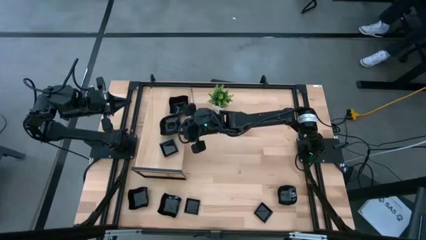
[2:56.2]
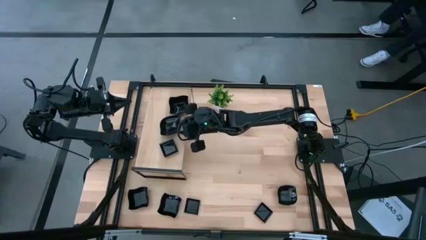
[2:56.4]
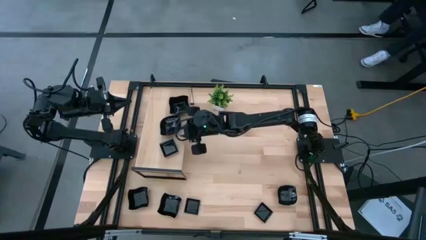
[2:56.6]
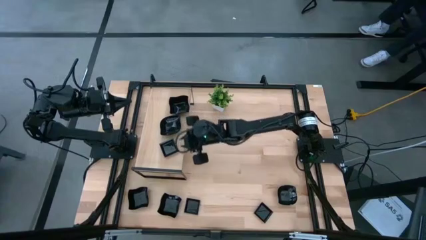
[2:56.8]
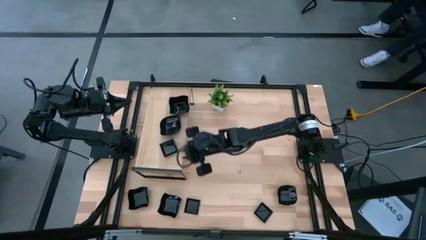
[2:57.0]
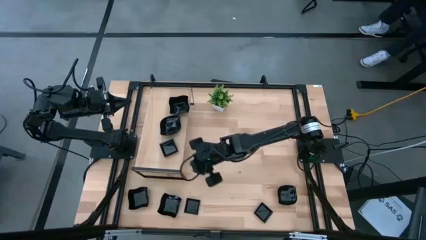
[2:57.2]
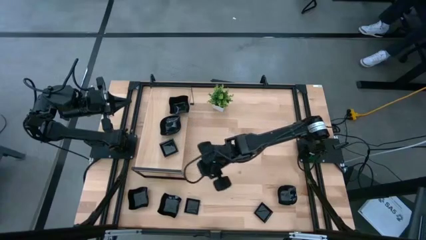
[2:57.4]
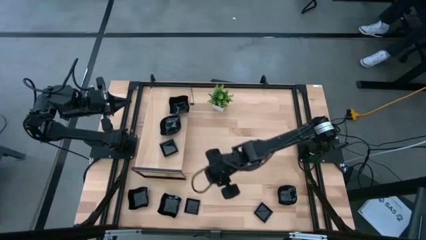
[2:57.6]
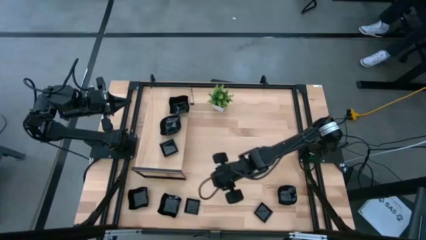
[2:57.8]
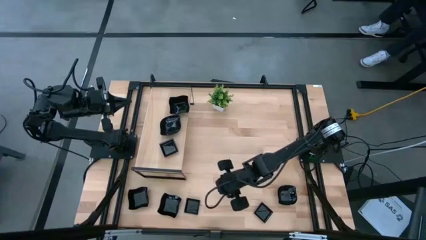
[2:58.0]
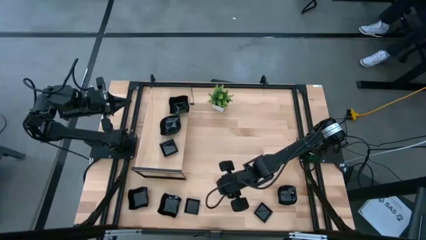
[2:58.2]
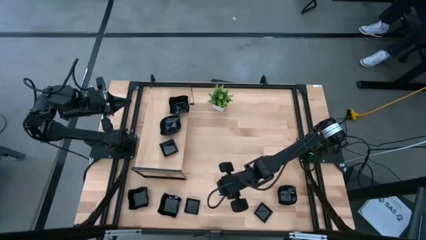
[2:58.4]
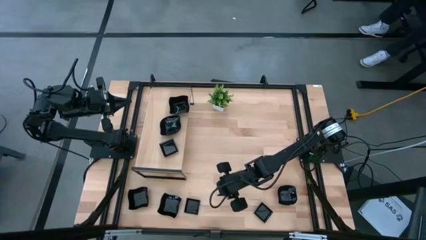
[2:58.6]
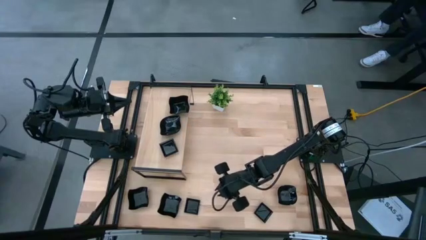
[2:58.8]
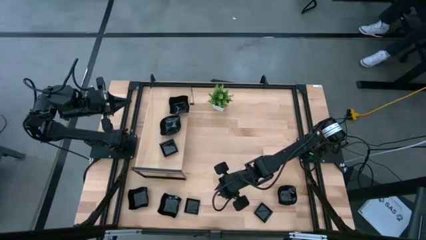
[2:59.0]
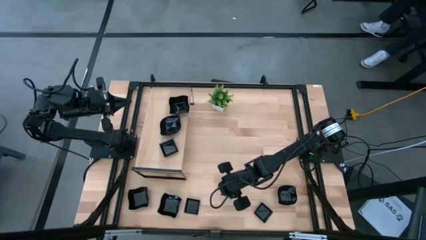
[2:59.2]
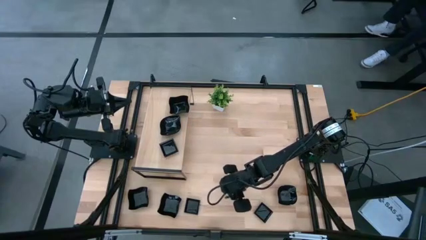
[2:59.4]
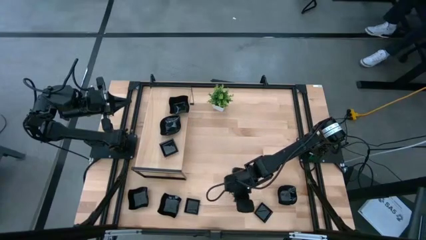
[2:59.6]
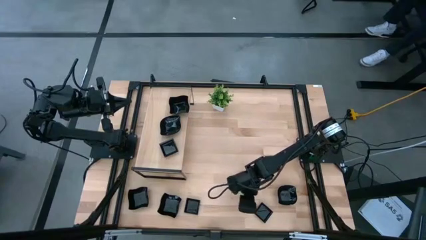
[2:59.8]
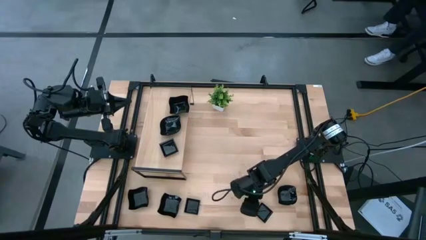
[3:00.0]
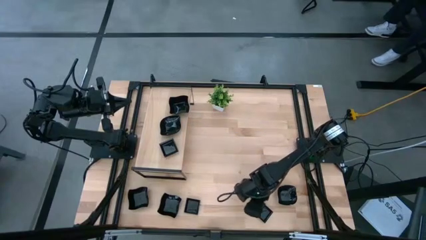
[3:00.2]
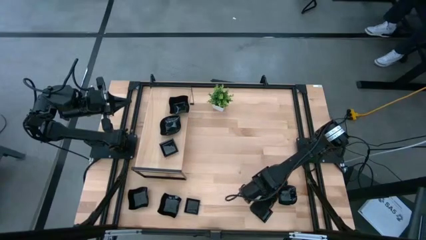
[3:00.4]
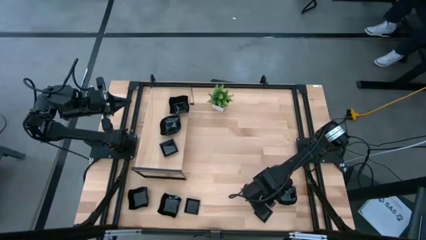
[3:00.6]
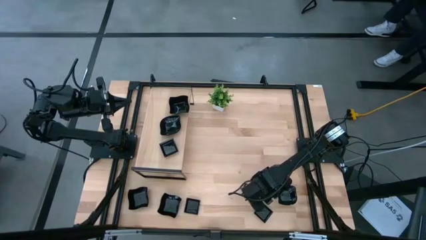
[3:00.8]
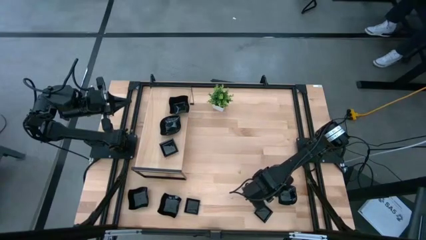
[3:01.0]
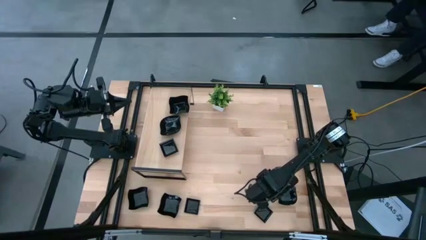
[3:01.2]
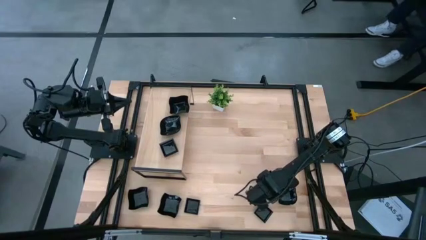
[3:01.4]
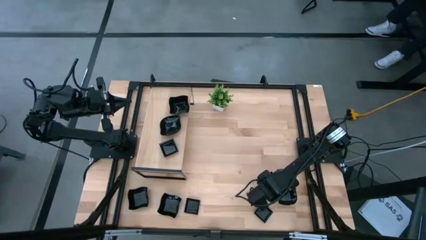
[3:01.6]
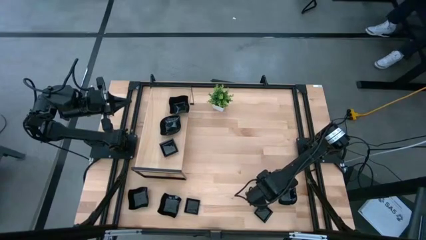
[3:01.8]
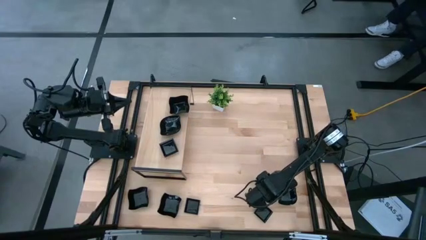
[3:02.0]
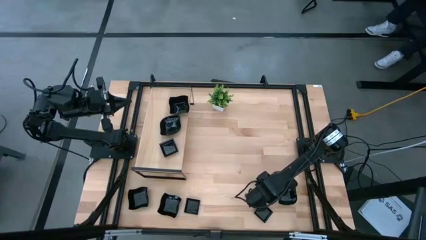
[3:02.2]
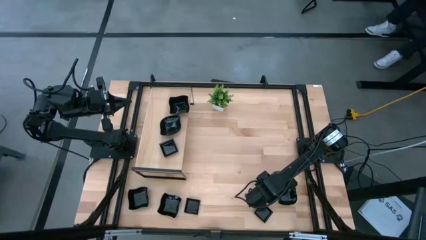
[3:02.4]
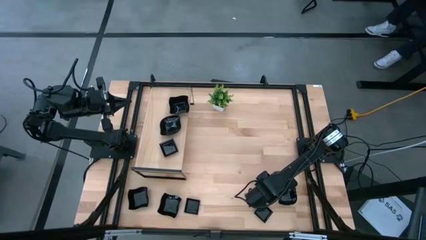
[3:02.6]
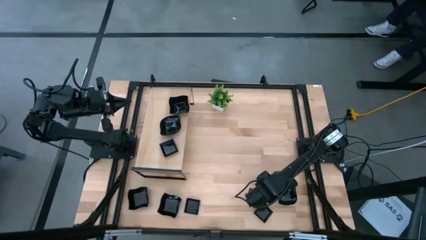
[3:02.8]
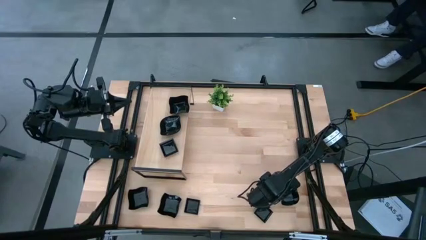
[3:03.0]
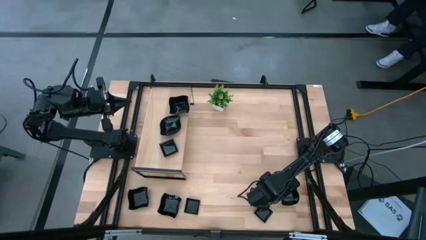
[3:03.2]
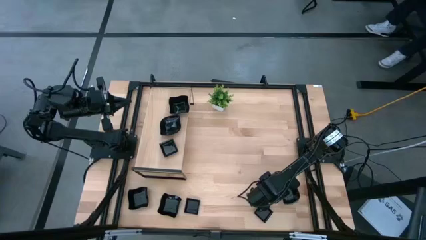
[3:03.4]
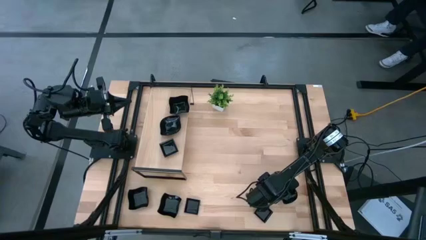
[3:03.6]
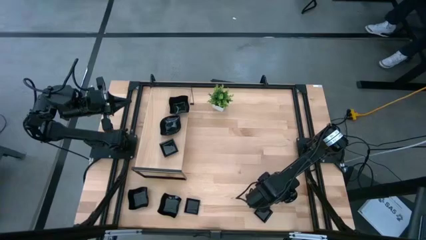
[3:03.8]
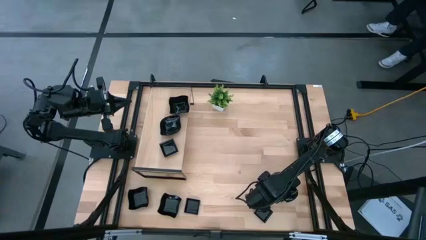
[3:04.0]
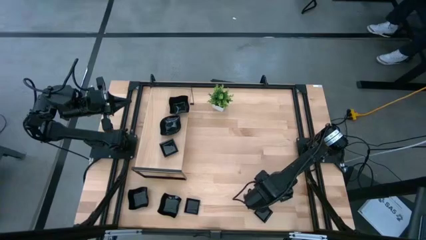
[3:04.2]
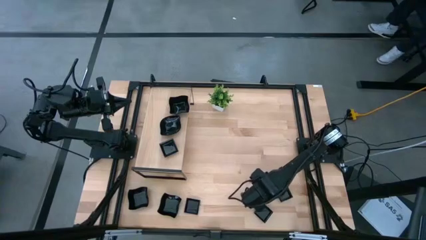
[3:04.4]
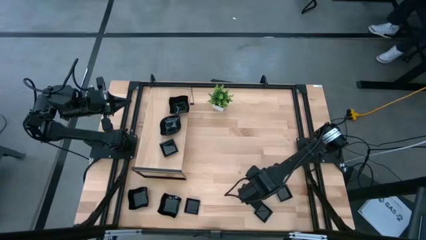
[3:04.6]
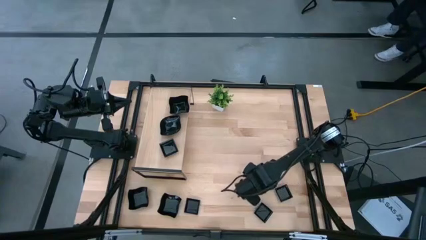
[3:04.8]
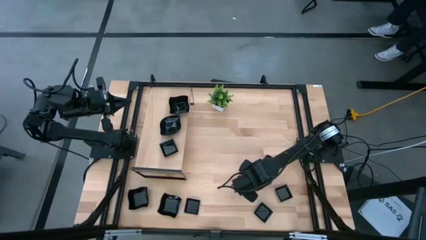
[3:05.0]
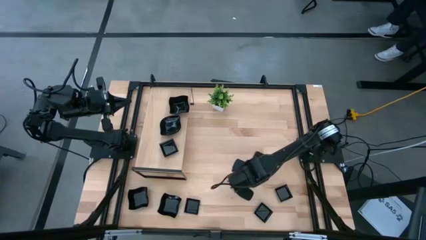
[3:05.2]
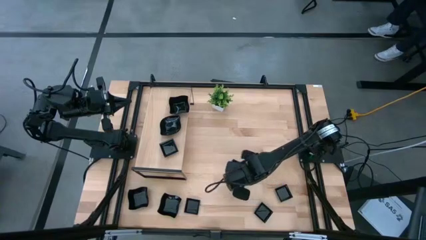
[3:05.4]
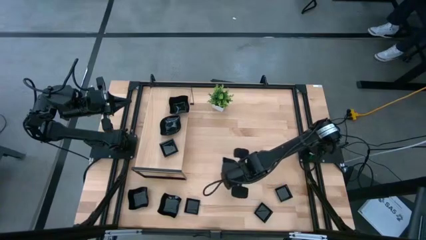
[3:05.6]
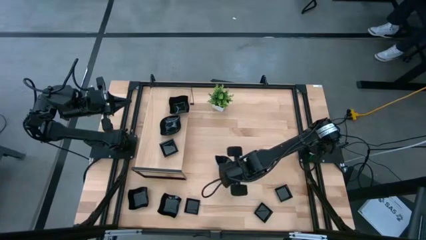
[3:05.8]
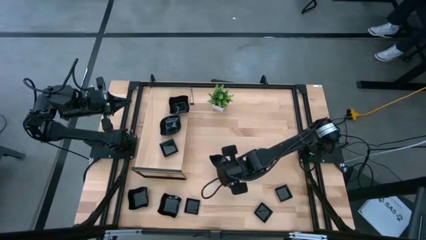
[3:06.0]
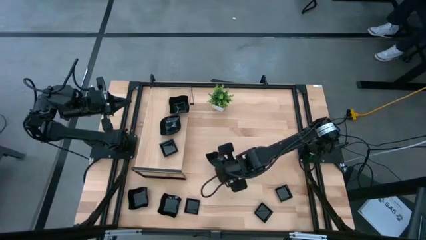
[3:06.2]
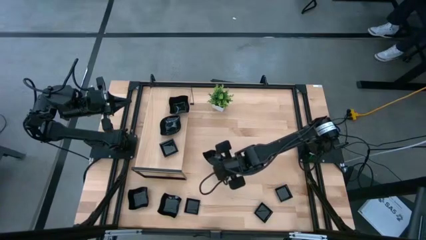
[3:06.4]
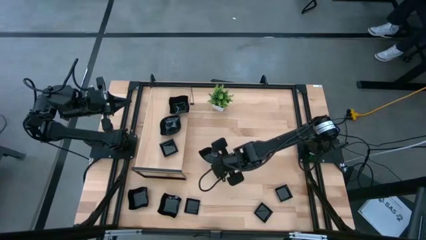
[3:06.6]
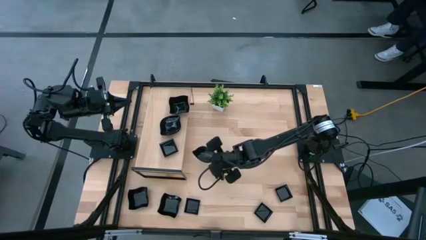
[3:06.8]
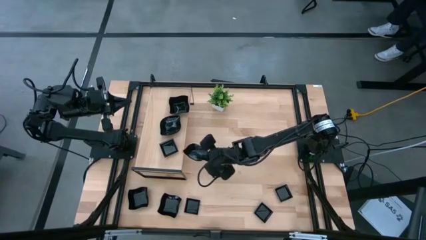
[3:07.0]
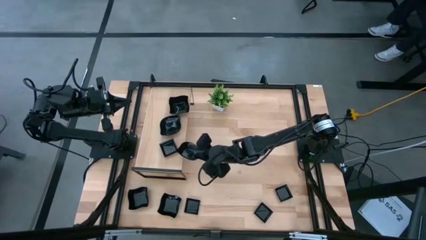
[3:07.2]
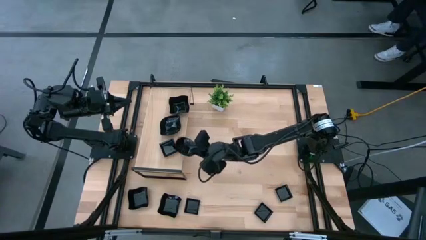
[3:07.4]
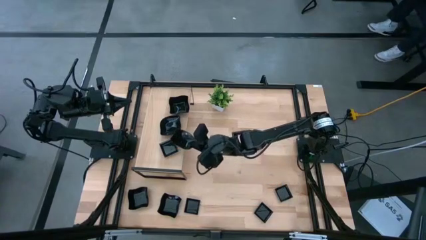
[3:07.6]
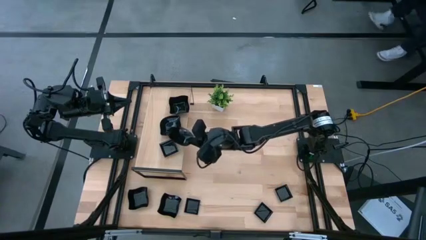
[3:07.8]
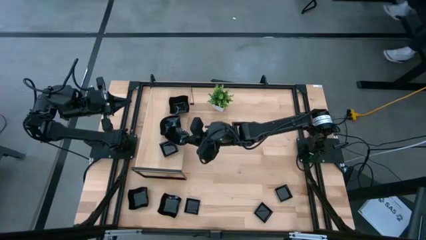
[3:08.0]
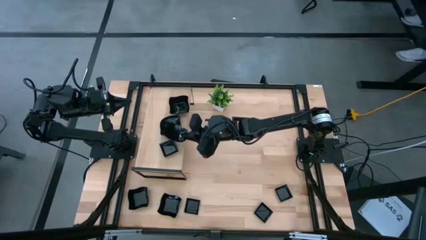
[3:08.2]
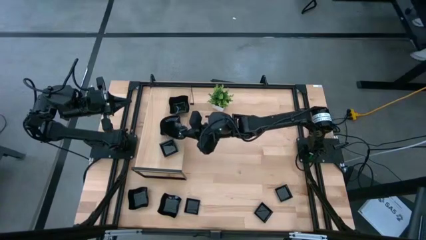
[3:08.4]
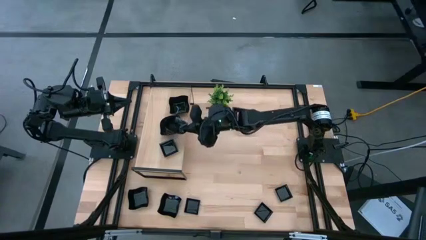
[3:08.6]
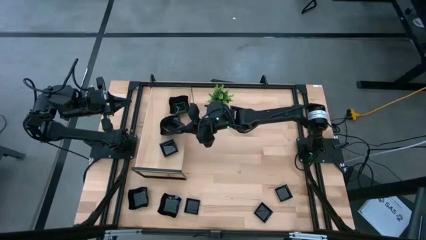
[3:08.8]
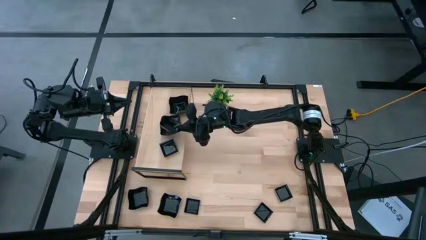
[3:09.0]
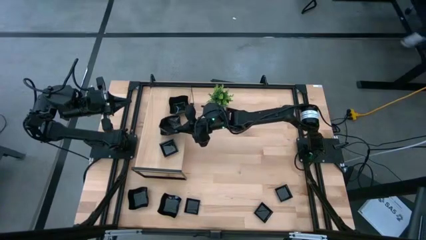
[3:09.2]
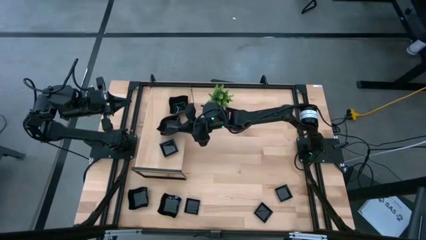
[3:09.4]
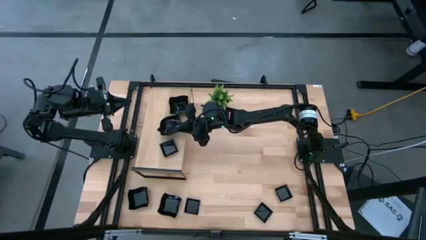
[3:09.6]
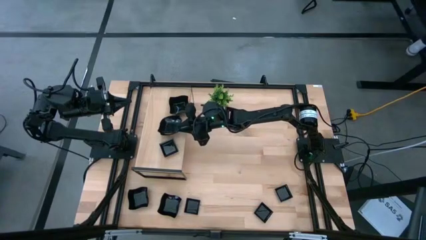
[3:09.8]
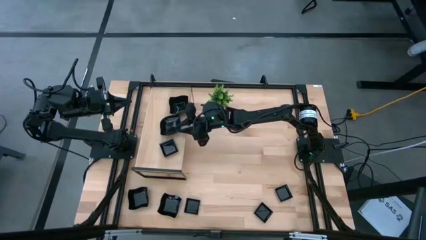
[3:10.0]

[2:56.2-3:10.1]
Task: Pick & Place Mini shaped plates
Stack the black leaf shape bowl on top of the black leaf shape bowl on the shelf

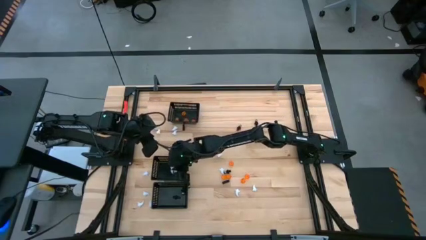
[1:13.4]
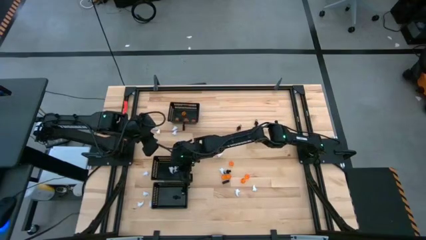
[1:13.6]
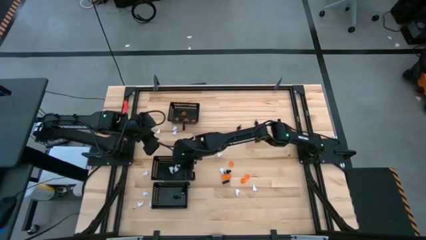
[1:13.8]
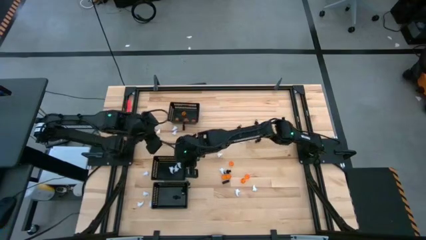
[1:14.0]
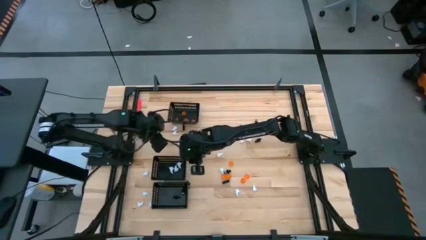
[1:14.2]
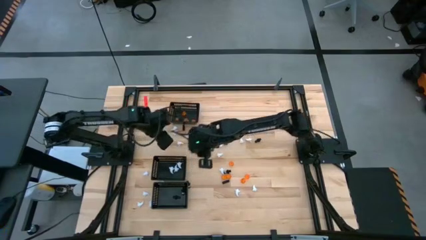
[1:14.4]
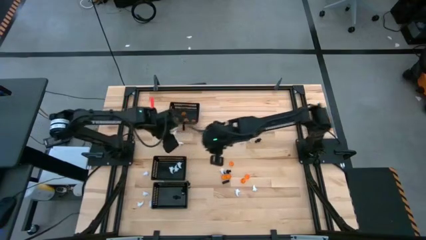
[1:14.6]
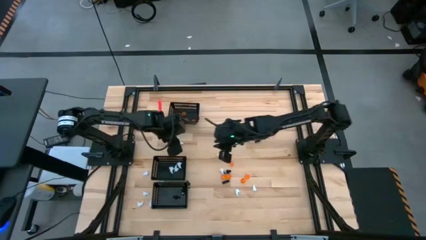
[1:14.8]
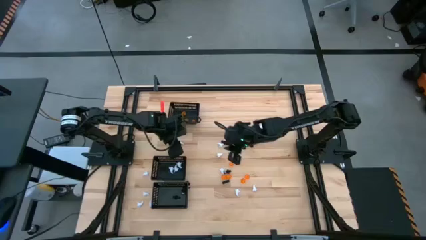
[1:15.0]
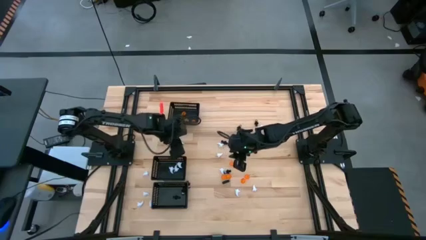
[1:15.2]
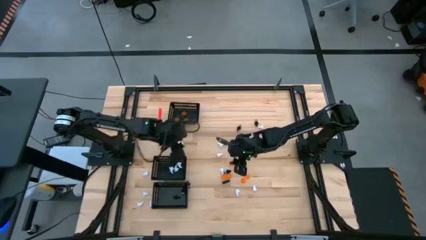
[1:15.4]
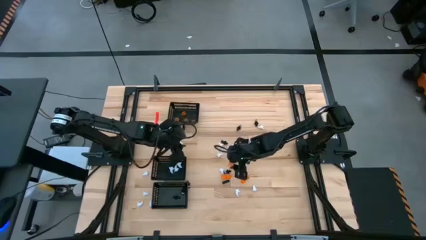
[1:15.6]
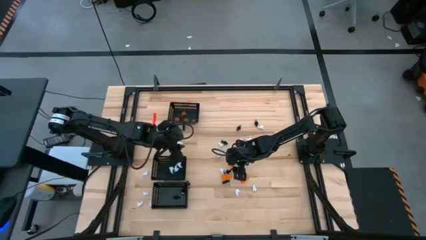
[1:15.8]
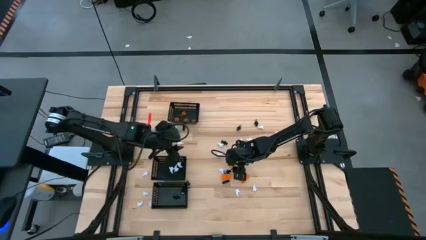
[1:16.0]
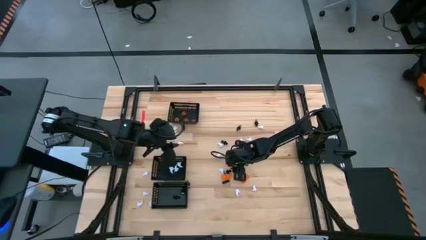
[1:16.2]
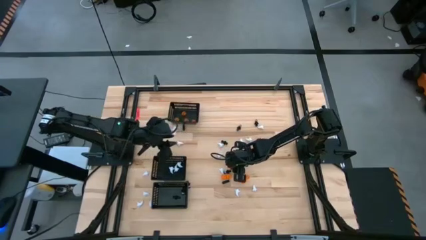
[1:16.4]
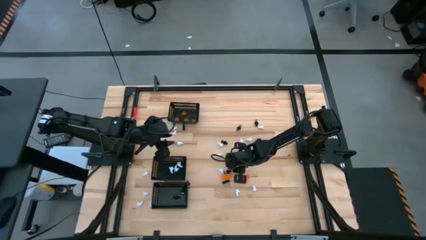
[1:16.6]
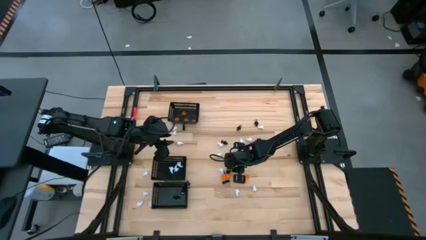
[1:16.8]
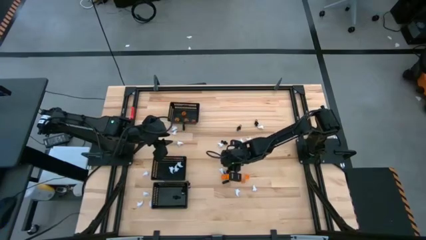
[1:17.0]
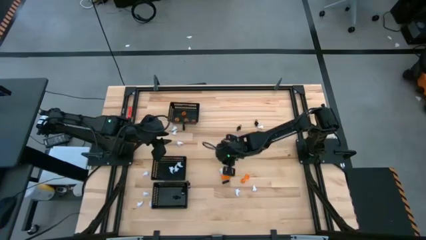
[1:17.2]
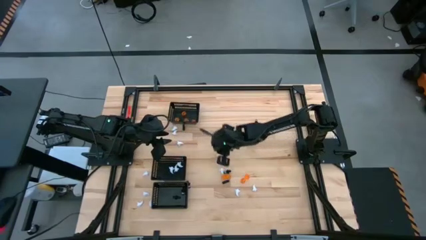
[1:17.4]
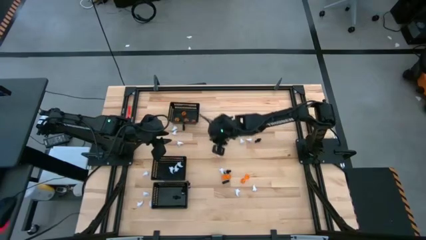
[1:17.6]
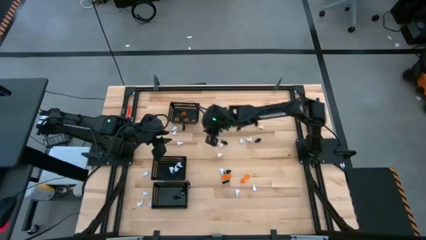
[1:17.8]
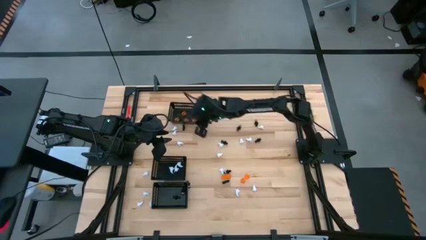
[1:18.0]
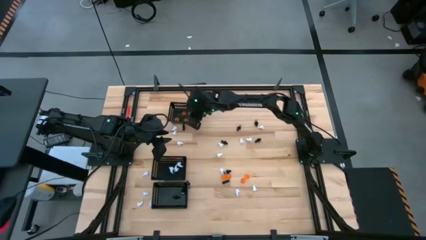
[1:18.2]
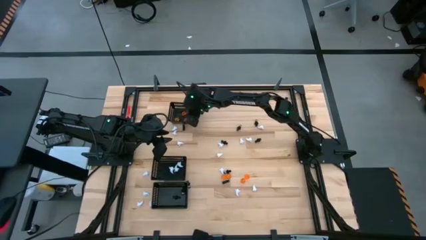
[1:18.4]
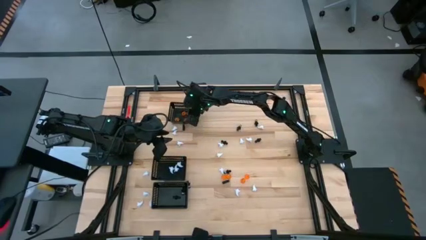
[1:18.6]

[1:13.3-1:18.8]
Task: Sort Halloween decoration
Put the orange pumpkin toy into the top black bin
